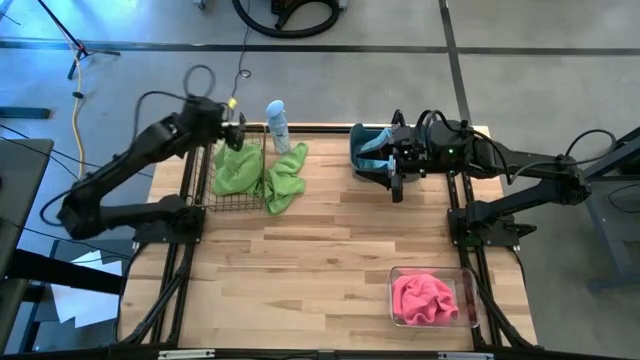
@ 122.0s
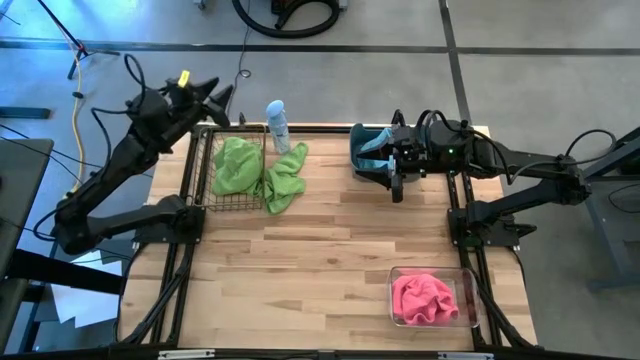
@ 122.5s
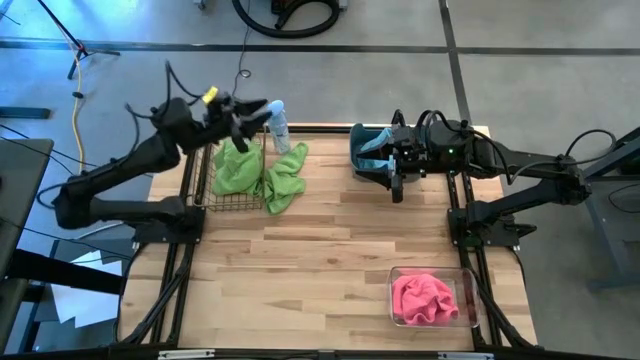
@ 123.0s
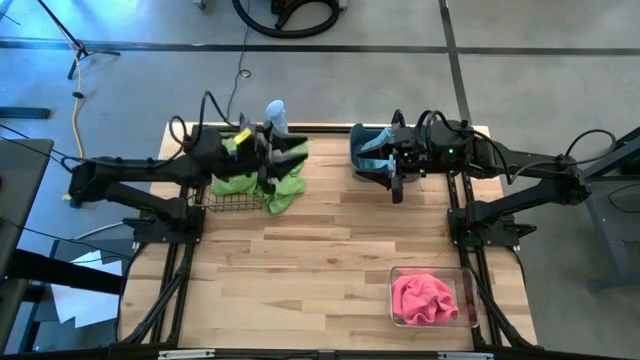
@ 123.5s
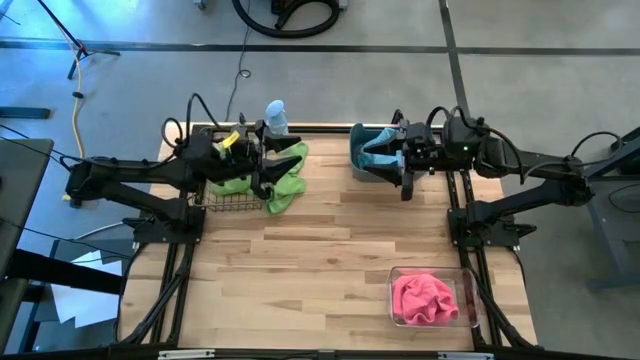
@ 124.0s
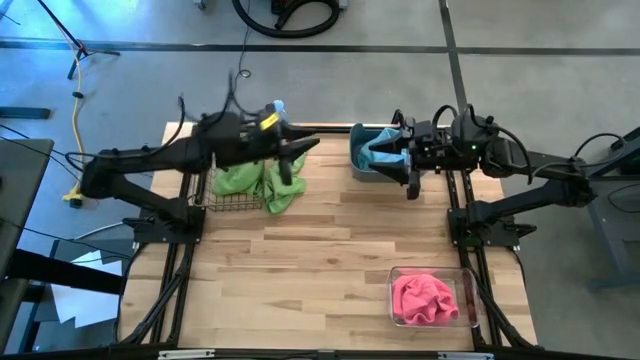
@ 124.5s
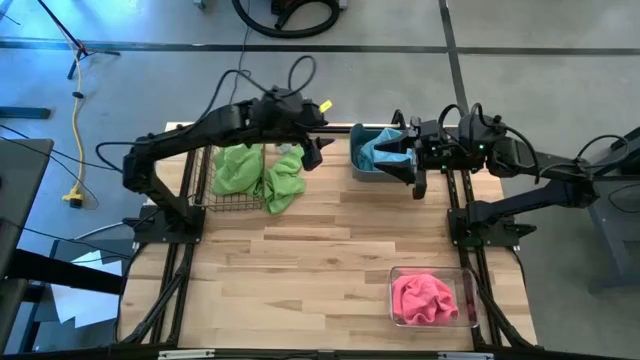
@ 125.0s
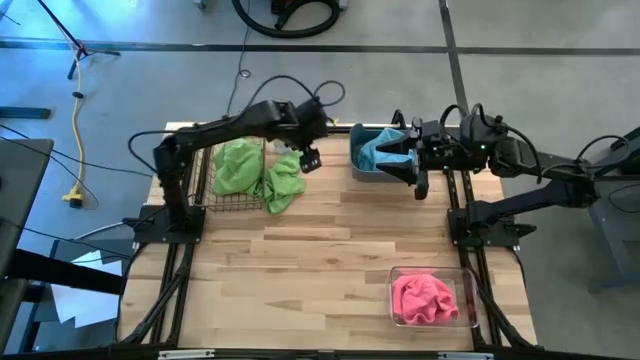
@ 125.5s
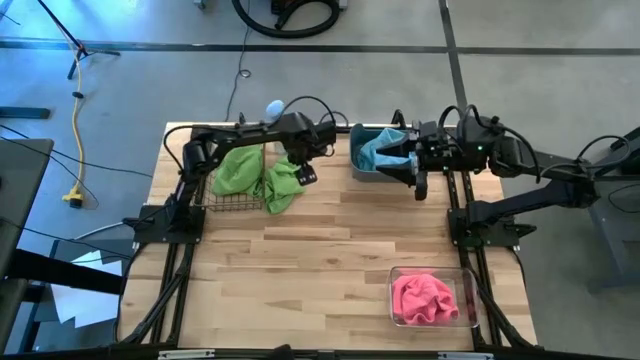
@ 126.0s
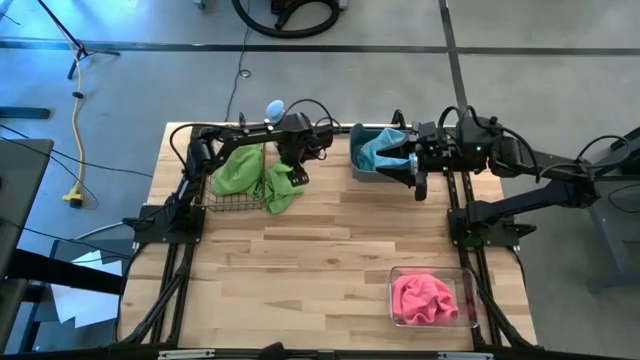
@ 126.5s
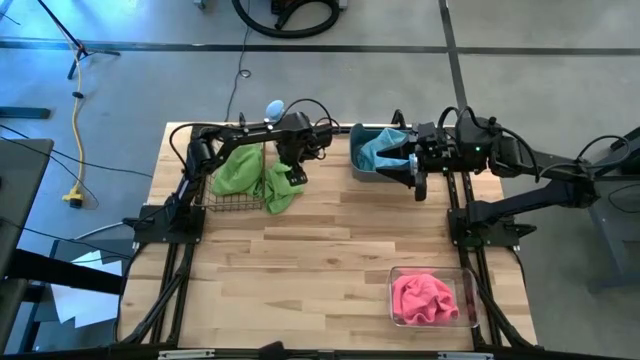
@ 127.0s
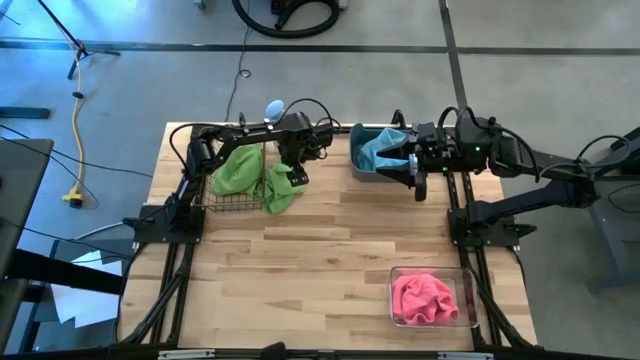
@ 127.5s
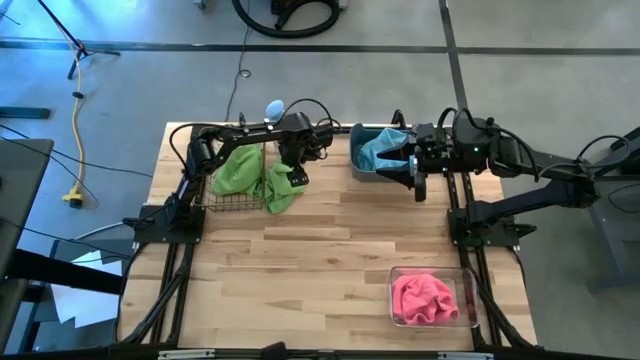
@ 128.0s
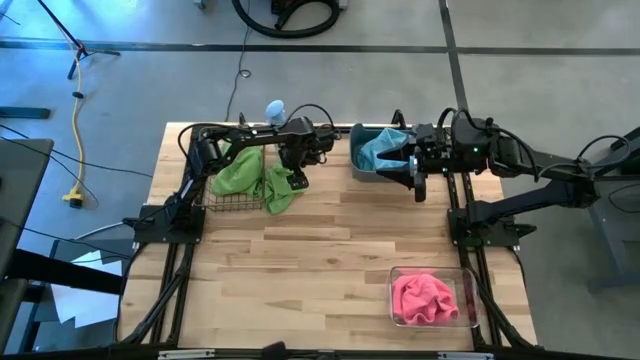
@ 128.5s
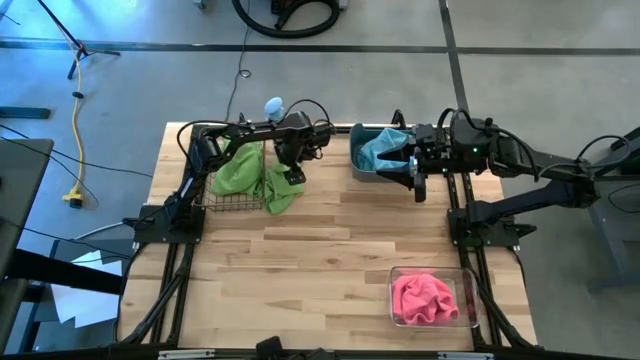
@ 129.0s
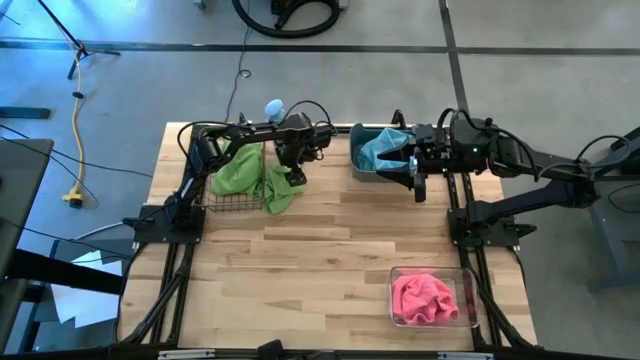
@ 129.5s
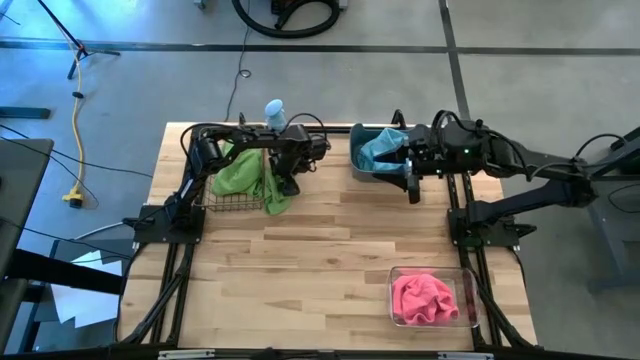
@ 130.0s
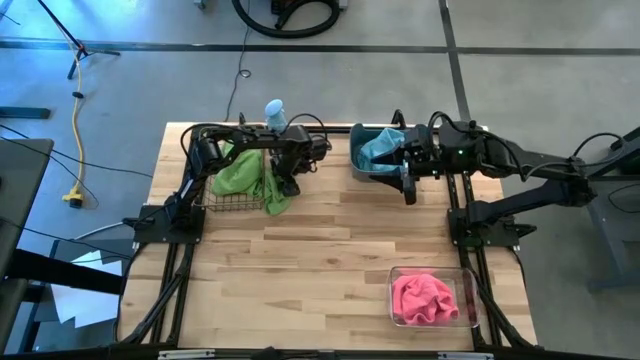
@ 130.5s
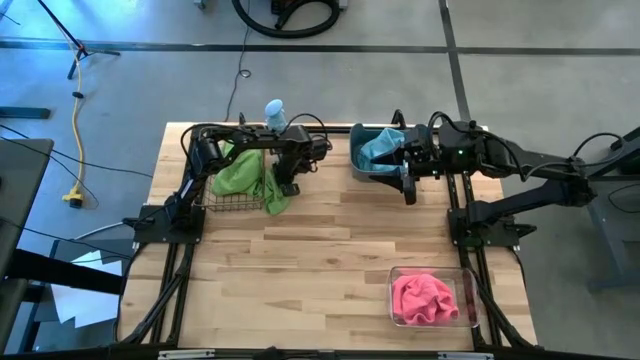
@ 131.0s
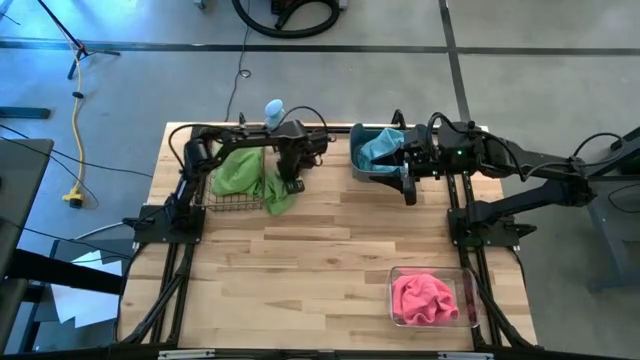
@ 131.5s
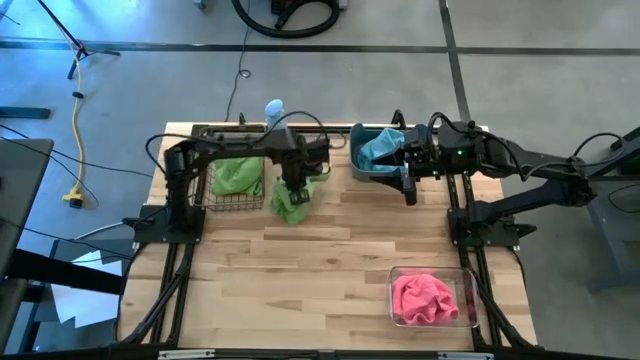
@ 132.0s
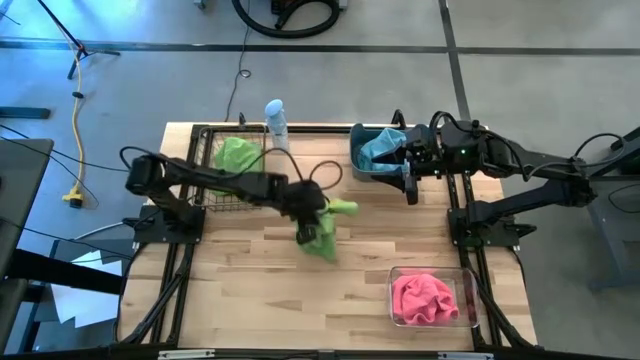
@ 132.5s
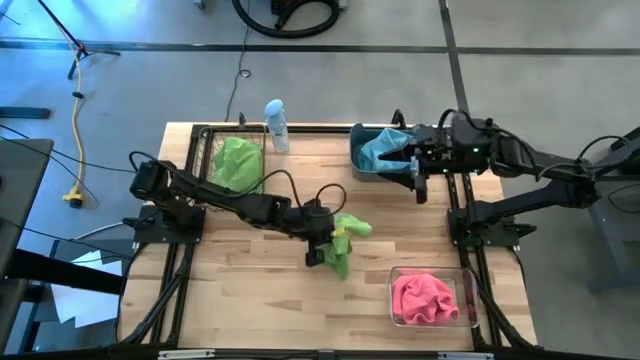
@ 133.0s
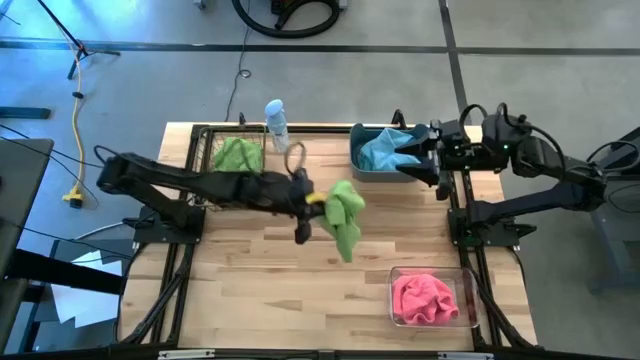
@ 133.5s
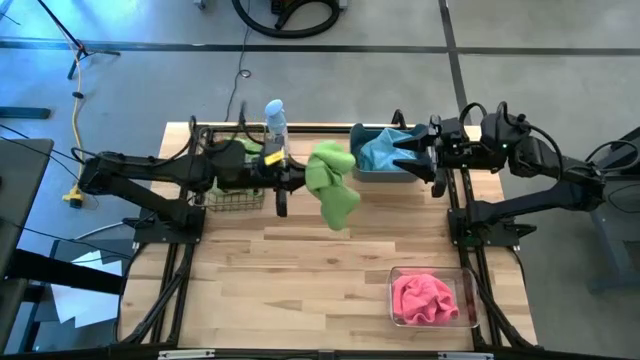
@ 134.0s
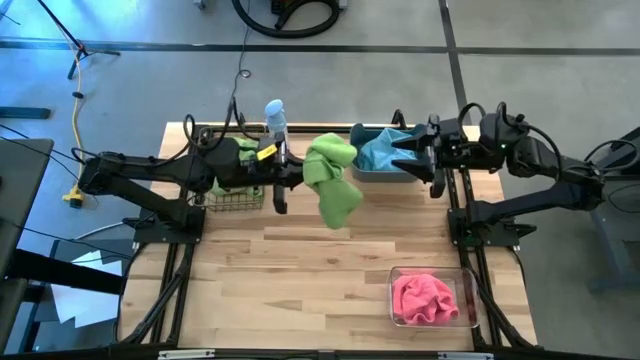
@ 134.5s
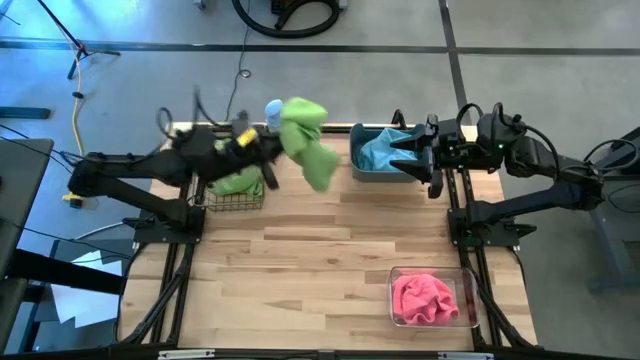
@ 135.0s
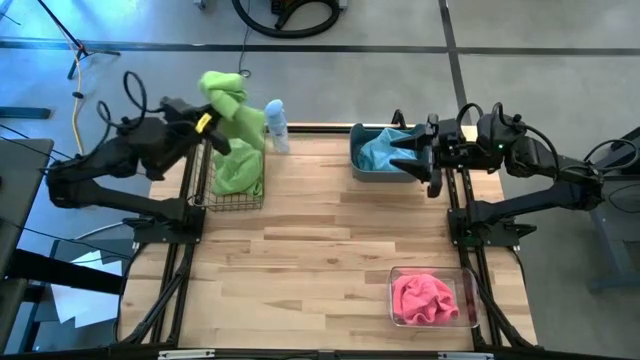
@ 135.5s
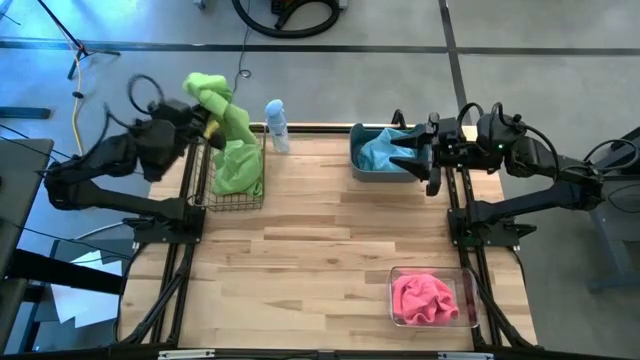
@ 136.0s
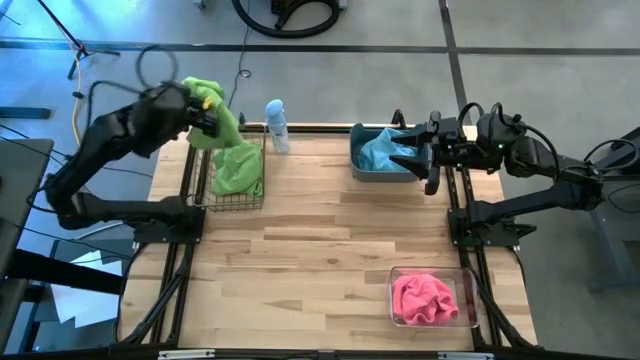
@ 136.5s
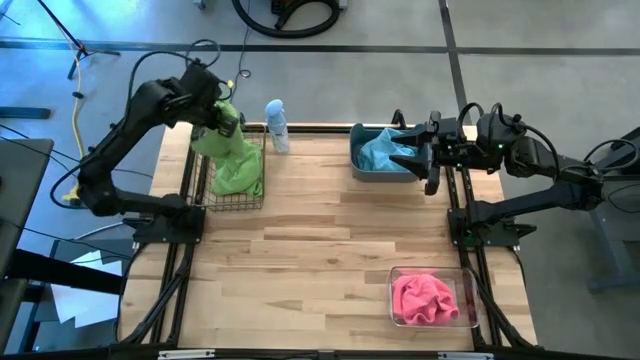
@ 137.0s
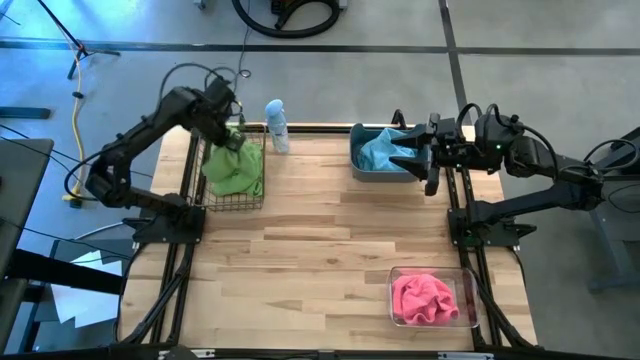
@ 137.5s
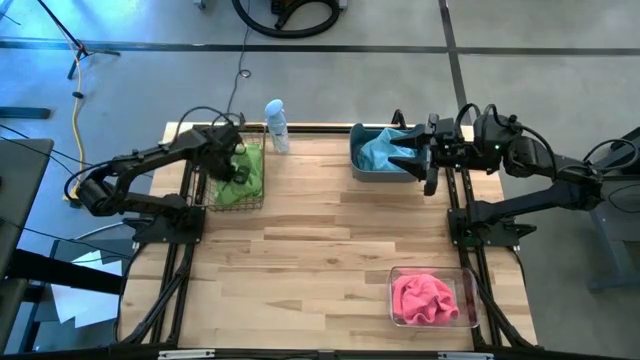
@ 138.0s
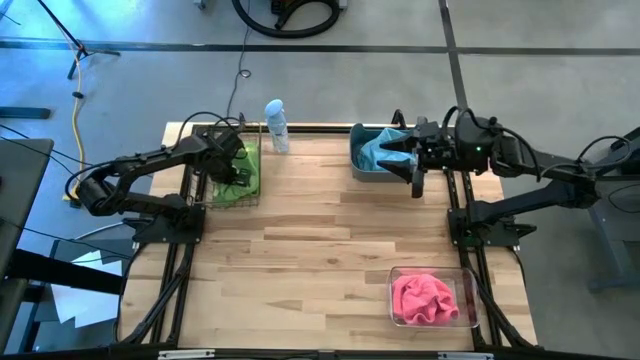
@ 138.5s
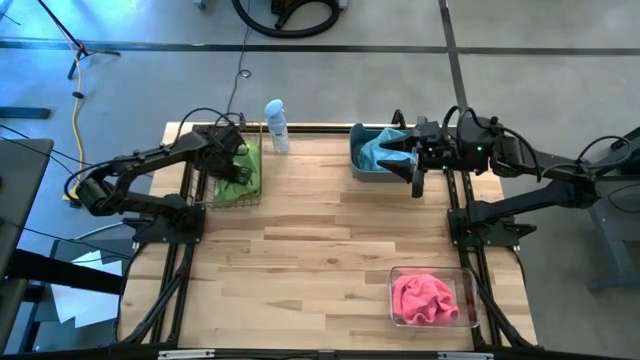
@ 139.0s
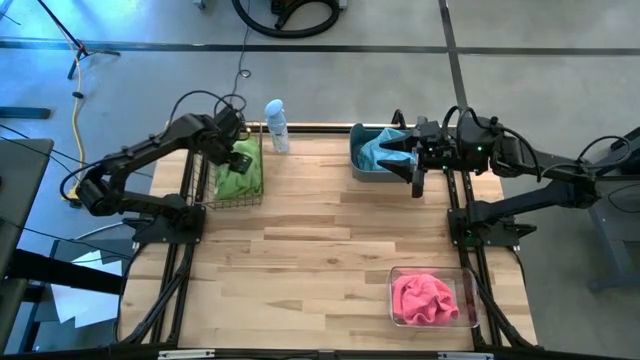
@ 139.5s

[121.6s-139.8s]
Task: Sort microfiber towel by color & place in baskets
Put the green towel into the wire basket

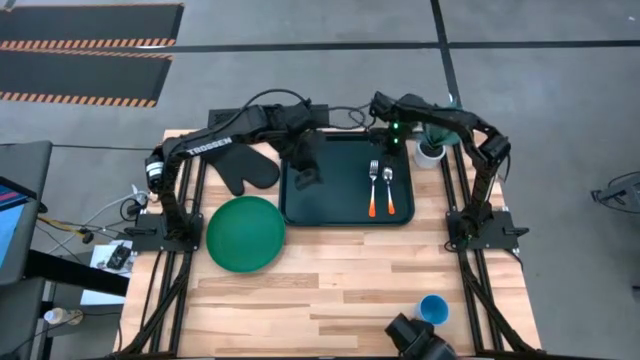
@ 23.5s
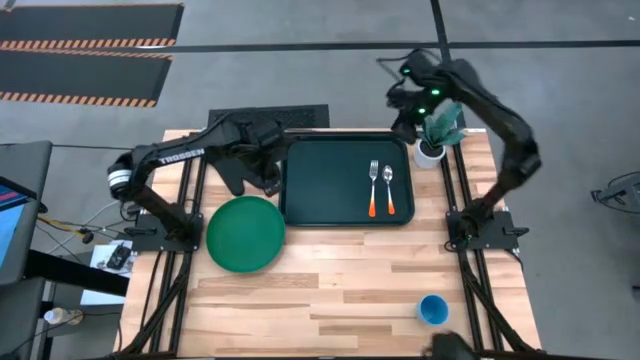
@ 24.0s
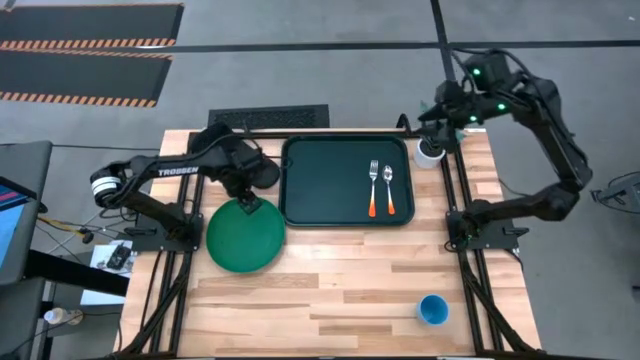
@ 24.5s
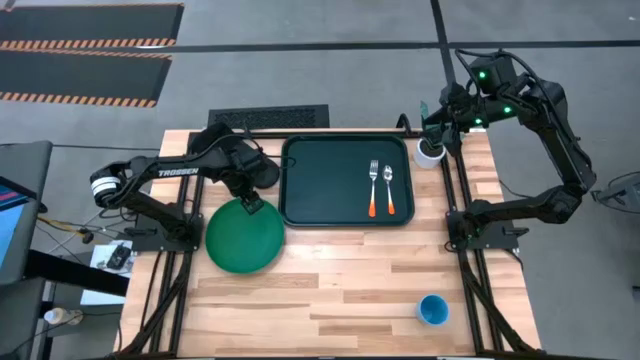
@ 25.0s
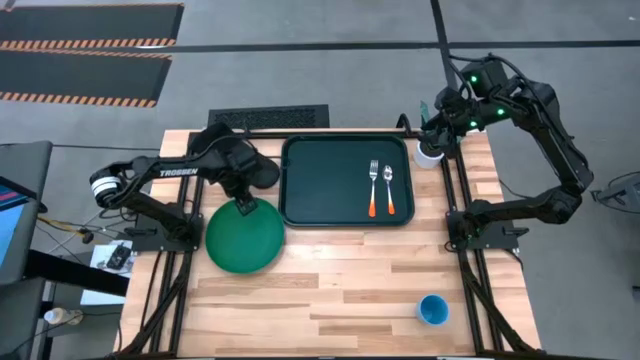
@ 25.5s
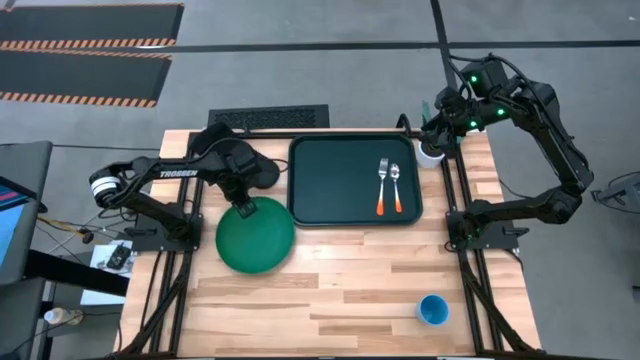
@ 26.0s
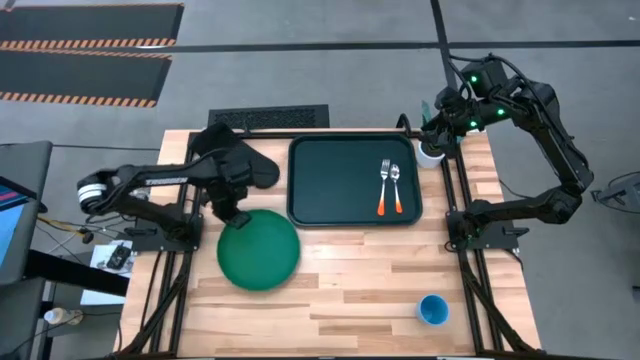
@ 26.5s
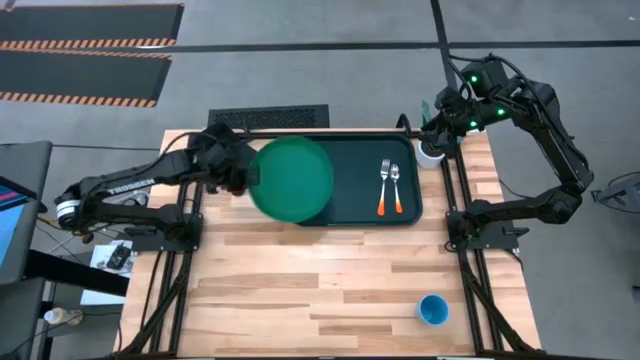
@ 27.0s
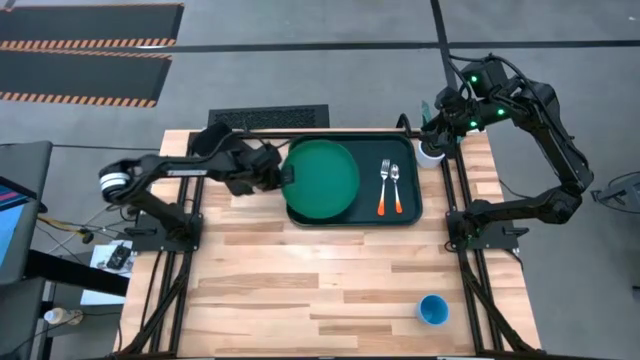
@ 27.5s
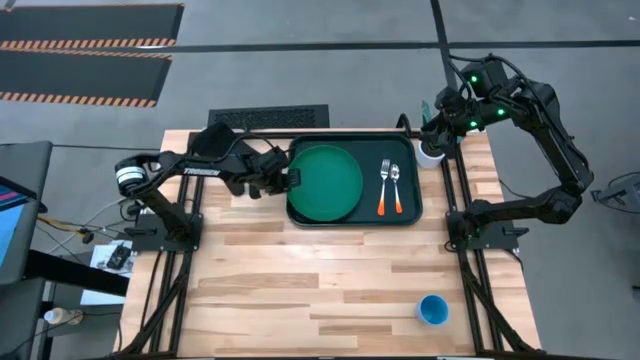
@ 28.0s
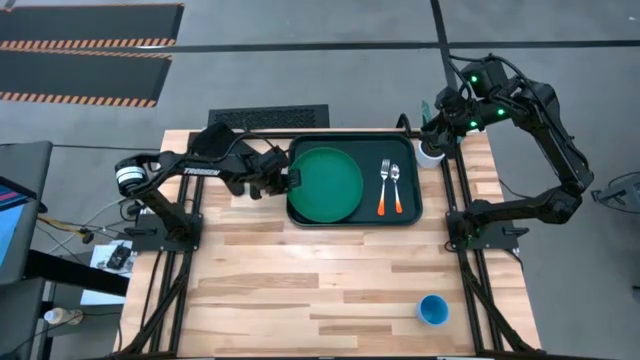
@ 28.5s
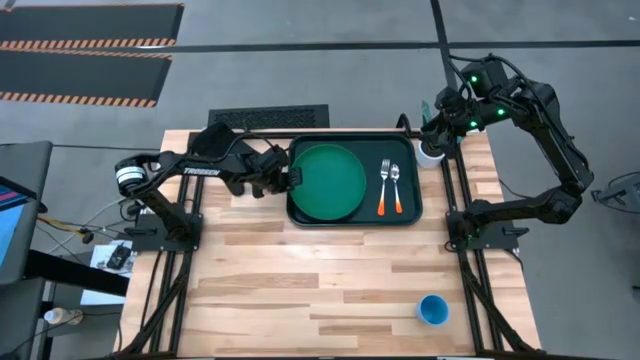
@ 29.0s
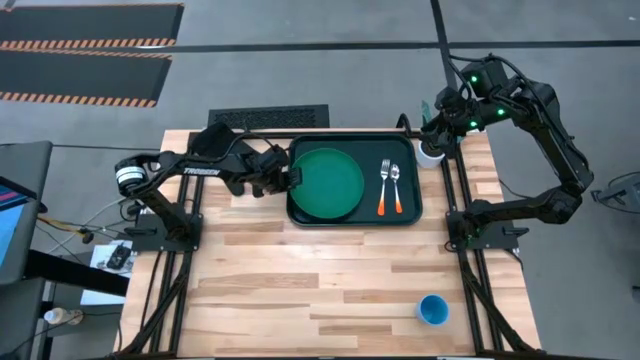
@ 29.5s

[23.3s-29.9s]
Task: Pick and place plate/cup/fork/spoon on tray
Put the green plate on the black tray to the left of the orange fork
